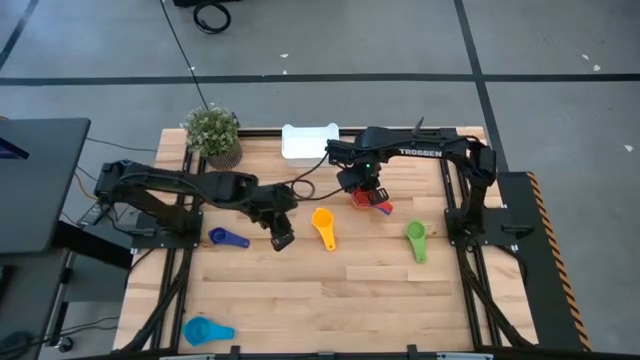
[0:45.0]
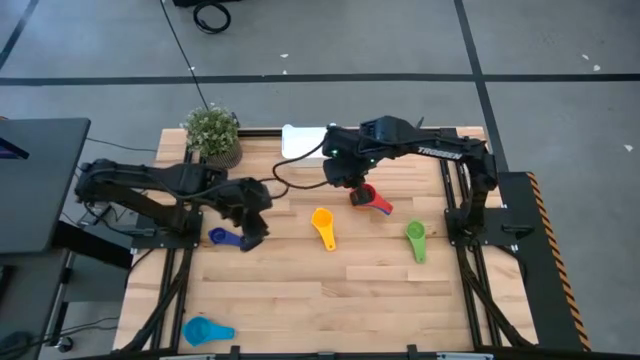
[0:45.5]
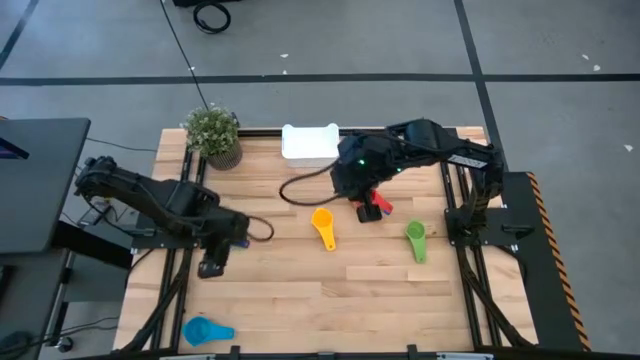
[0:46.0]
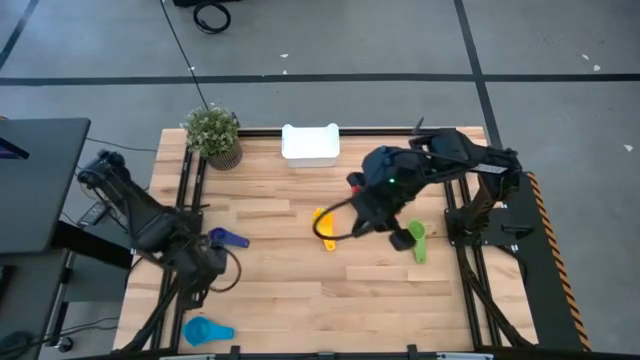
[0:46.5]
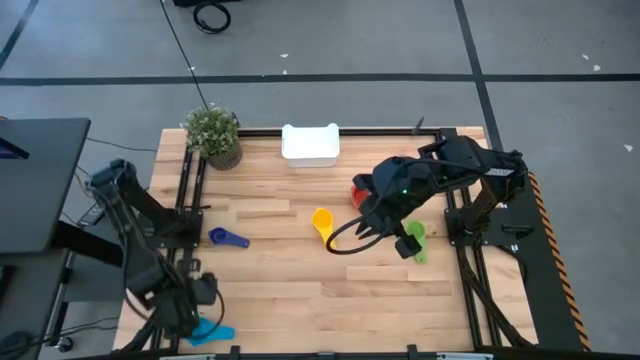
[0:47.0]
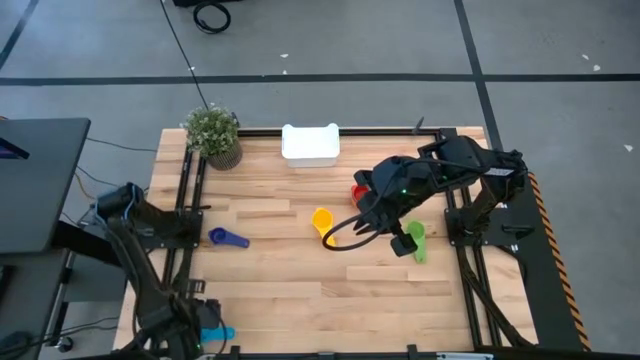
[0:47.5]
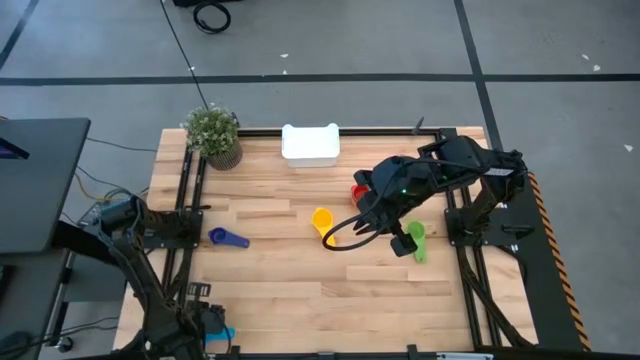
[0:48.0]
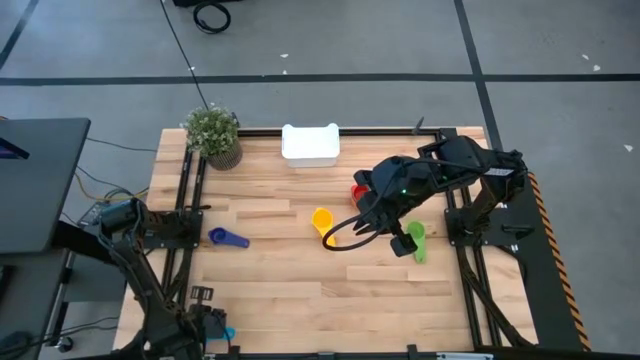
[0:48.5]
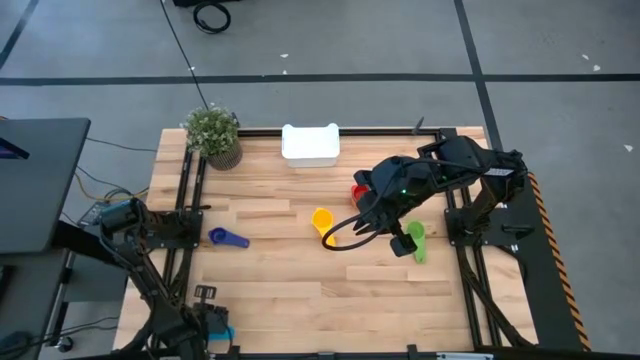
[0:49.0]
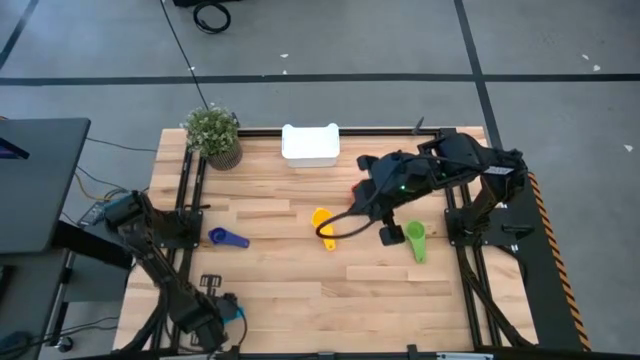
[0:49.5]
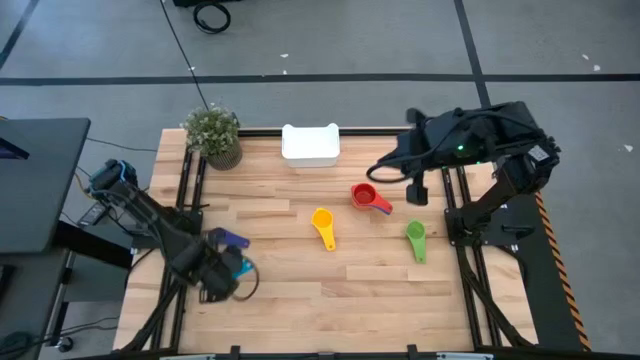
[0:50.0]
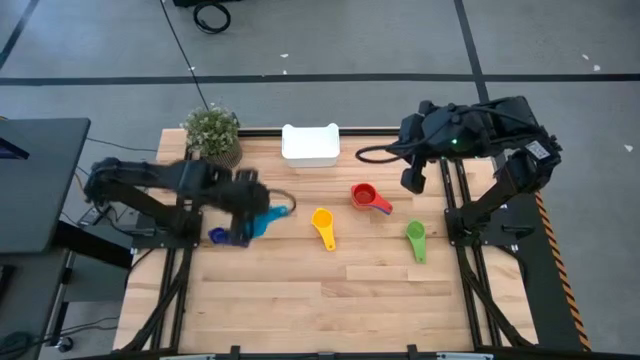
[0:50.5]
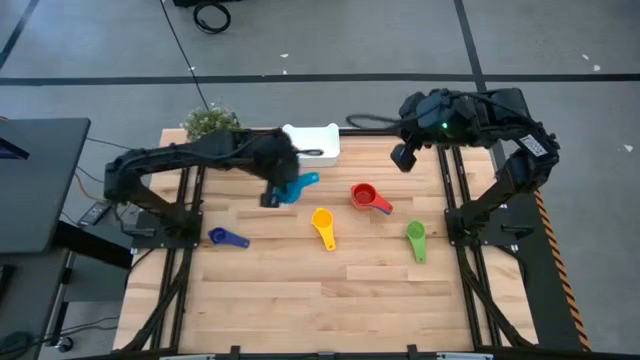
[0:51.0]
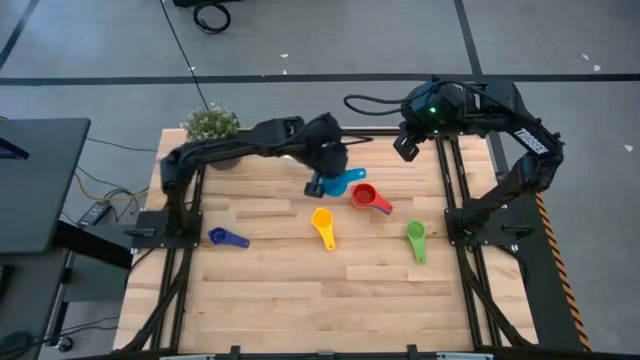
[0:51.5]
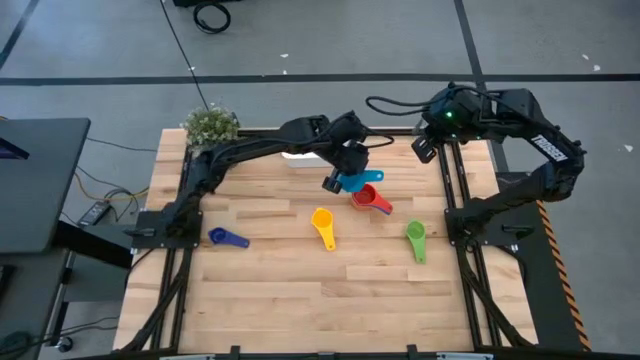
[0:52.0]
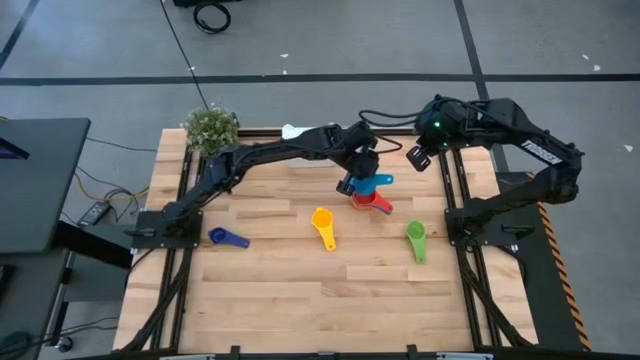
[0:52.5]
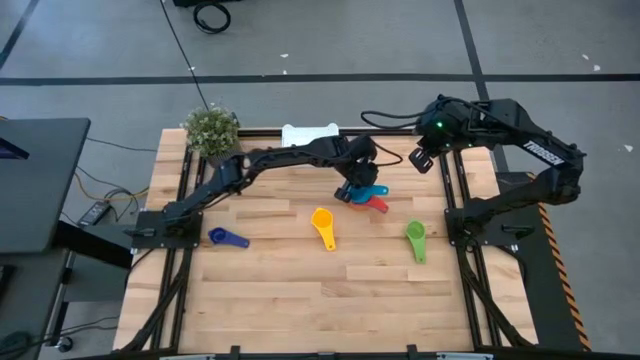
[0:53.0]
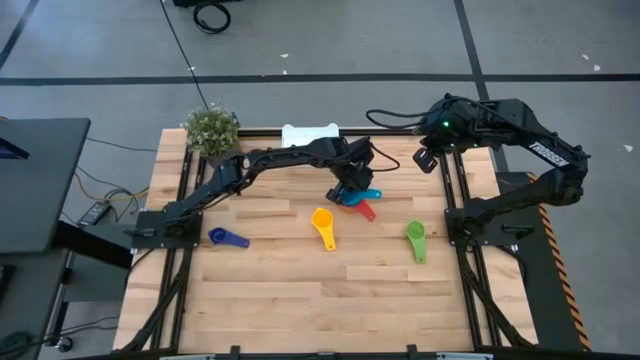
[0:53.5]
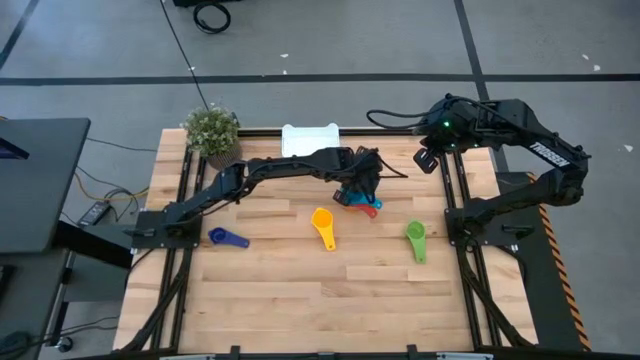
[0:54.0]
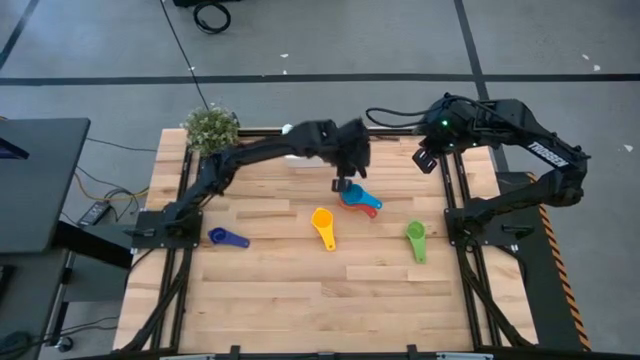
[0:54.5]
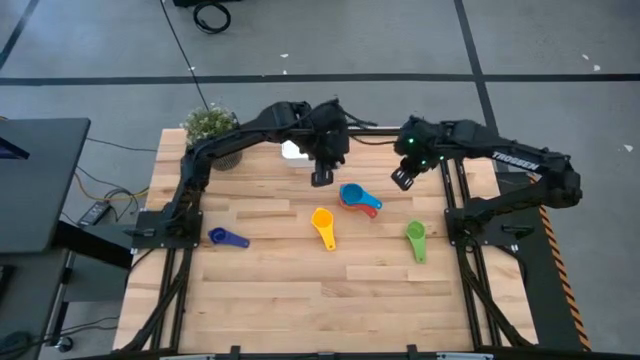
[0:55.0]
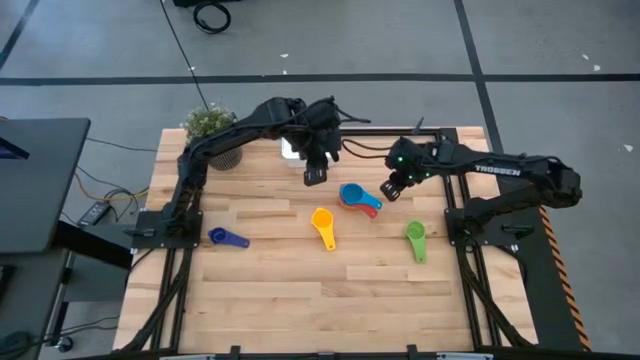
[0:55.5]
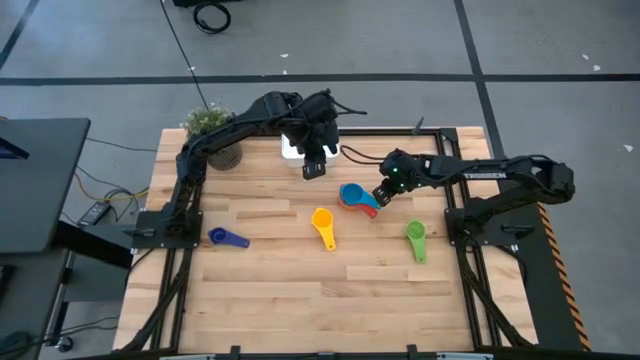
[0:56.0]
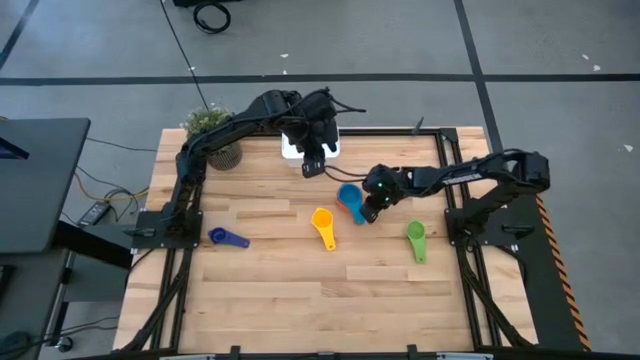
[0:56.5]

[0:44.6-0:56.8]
Task: Nest measuring cups in basket
Stack the light blue measuring cup on top of the red measuring cup

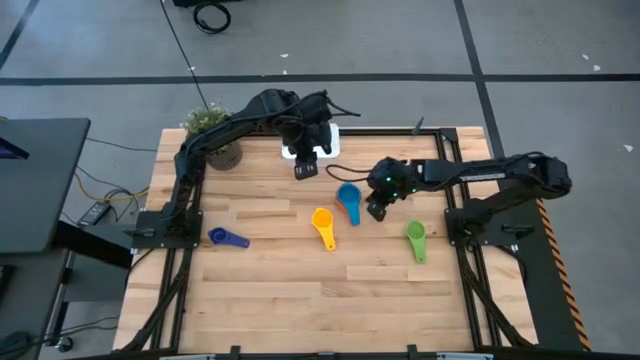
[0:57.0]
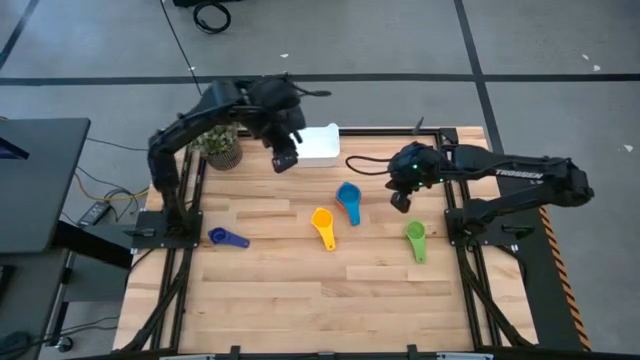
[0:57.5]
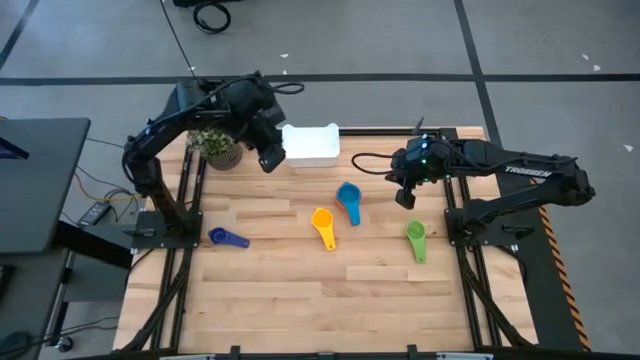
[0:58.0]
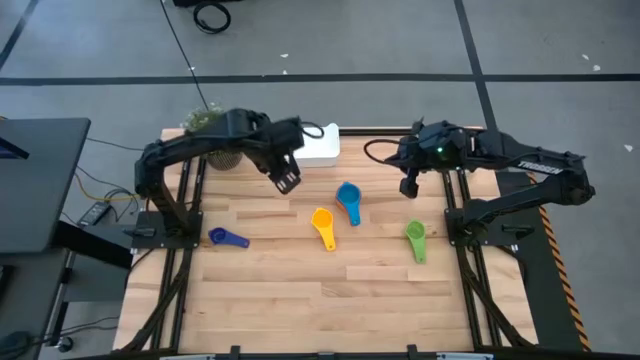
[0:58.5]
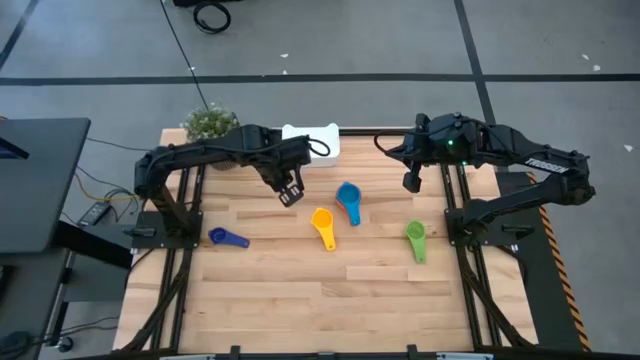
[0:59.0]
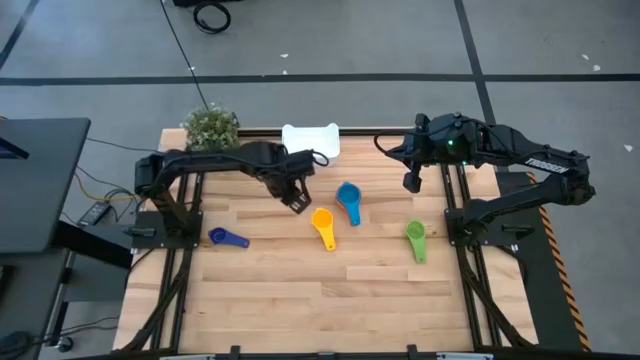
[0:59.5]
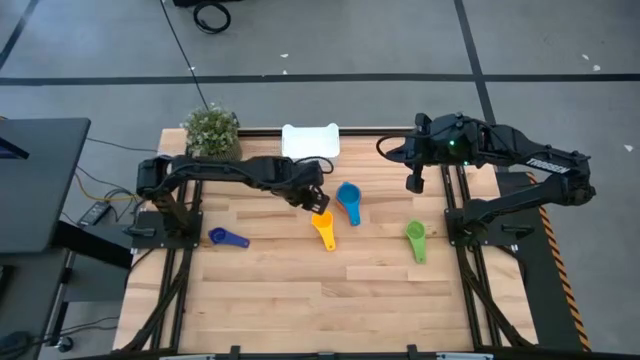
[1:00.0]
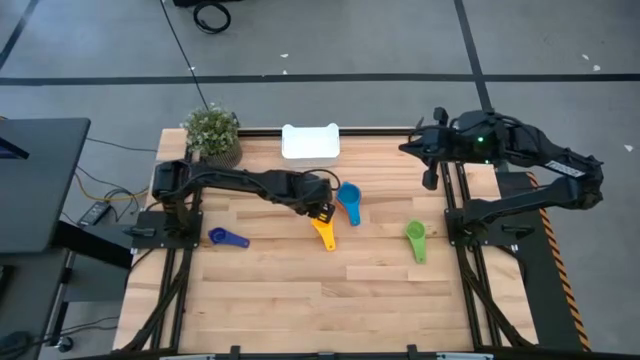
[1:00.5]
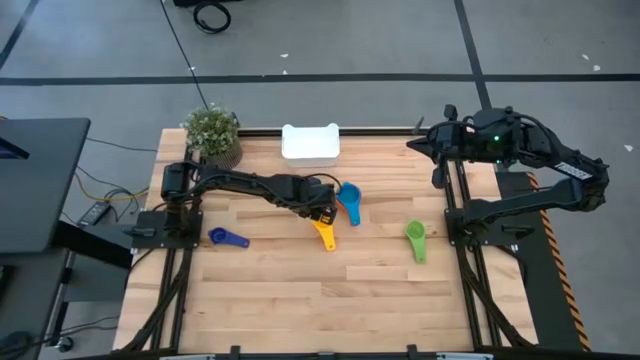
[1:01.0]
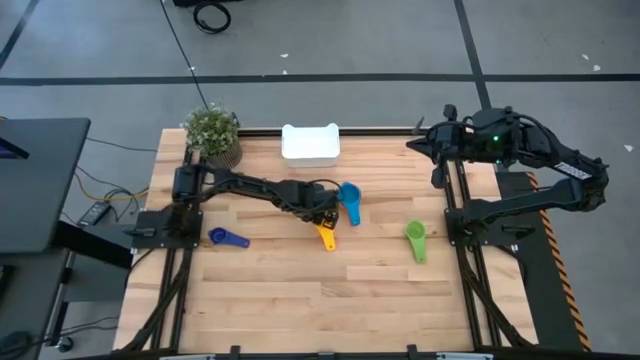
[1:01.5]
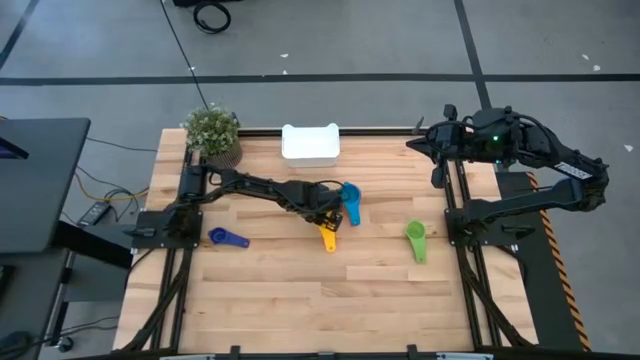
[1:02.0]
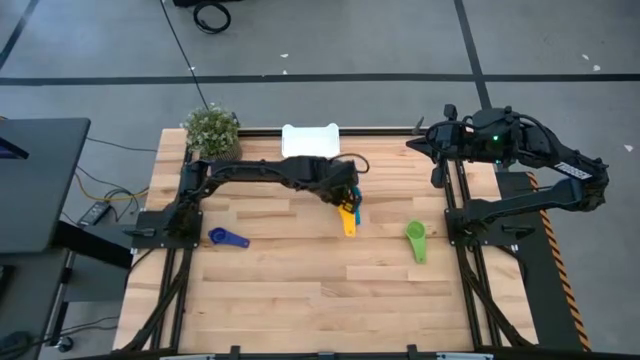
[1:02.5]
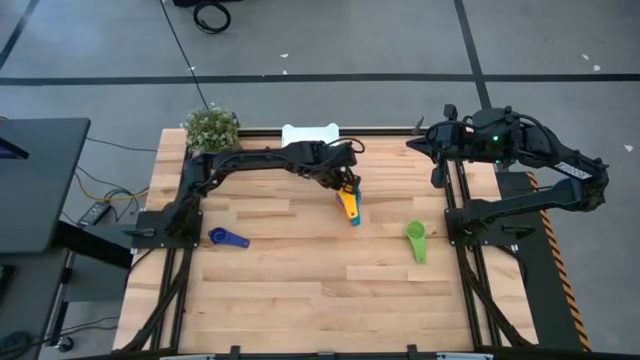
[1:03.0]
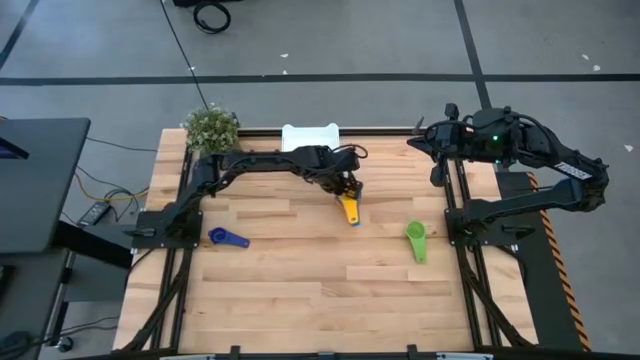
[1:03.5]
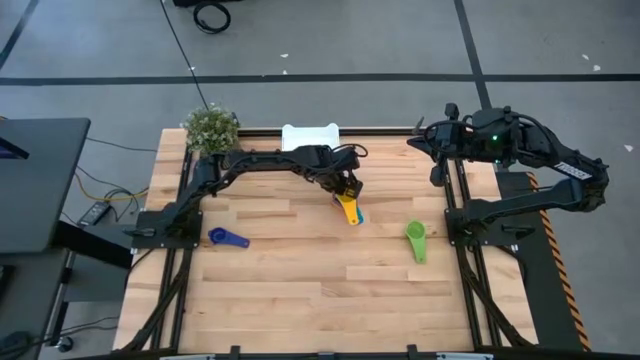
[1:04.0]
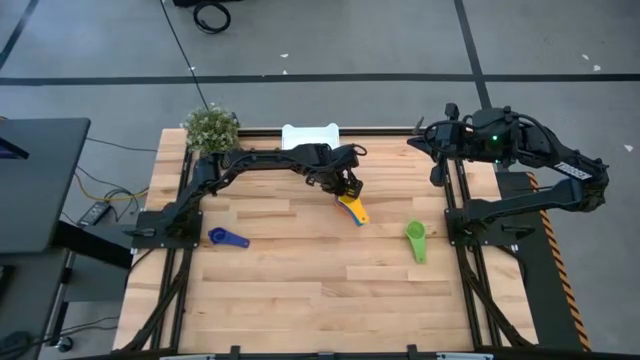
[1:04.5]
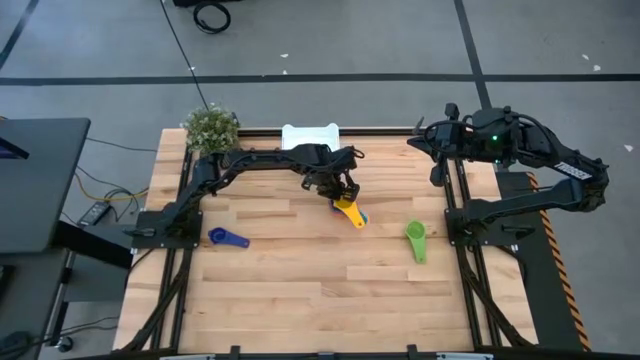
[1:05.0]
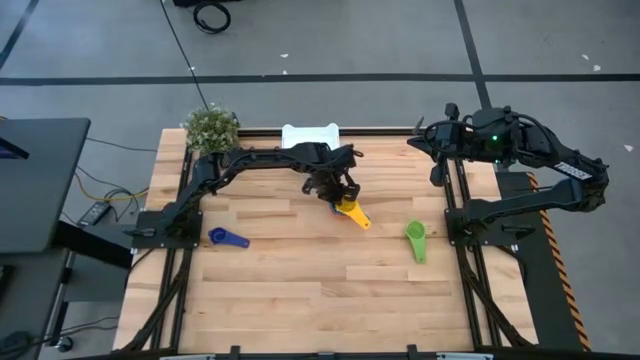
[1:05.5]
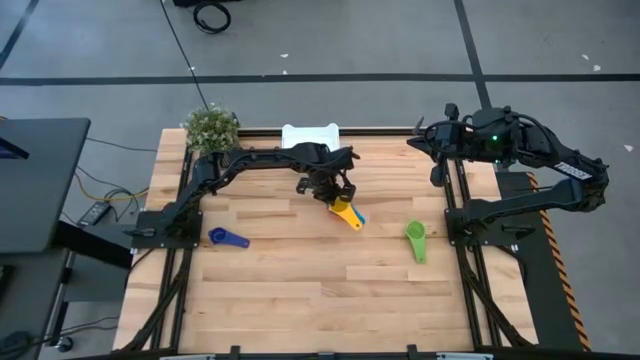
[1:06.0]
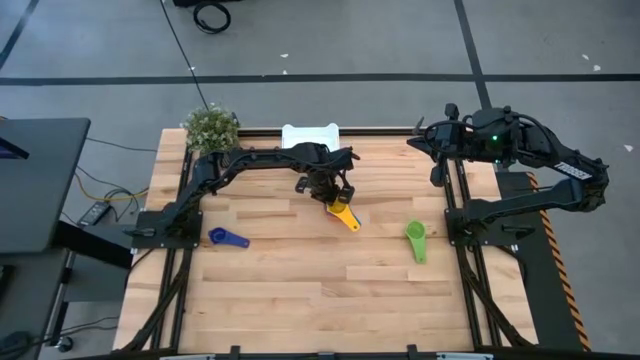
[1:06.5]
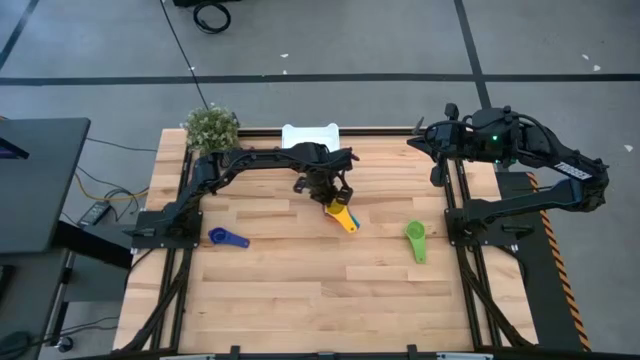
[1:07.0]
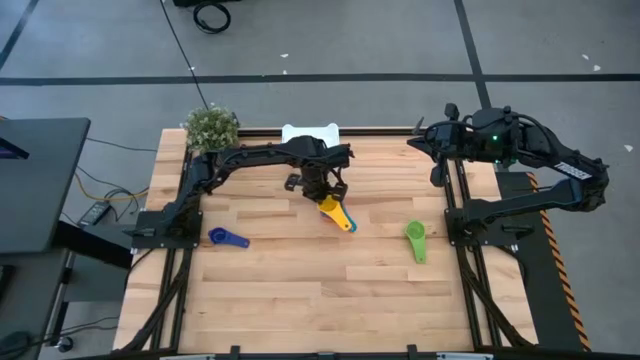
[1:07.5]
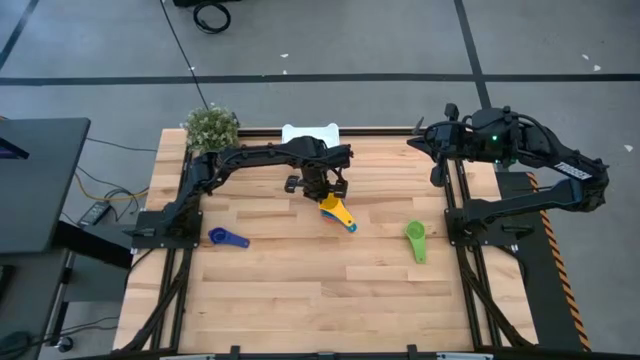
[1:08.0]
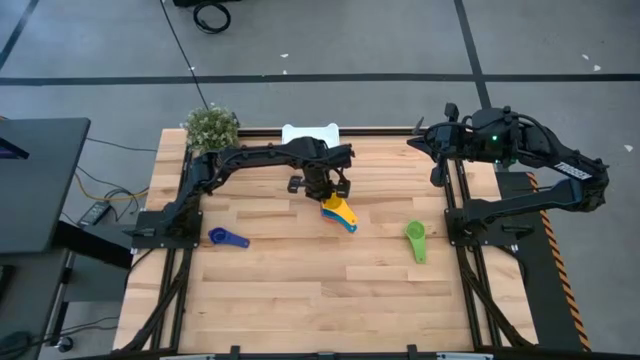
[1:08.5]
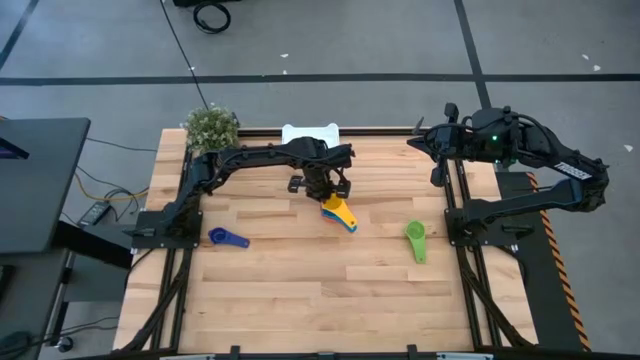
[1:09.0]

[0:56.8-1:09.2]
Stack the yellow measuring cup on top of the light blue measuring cup
